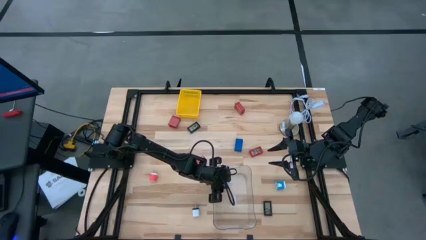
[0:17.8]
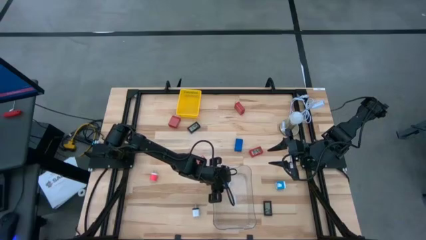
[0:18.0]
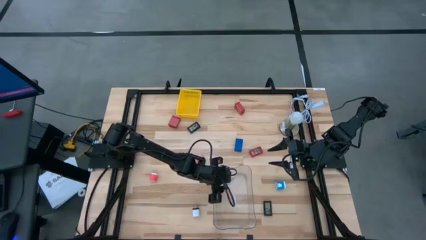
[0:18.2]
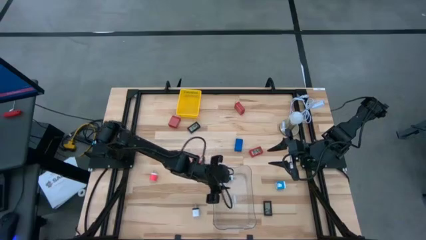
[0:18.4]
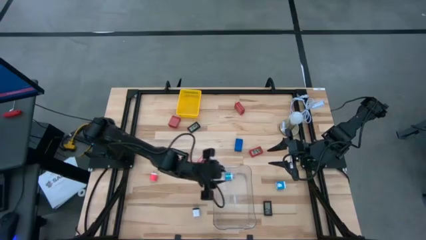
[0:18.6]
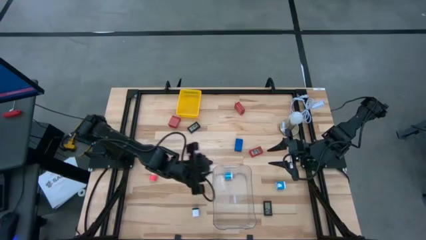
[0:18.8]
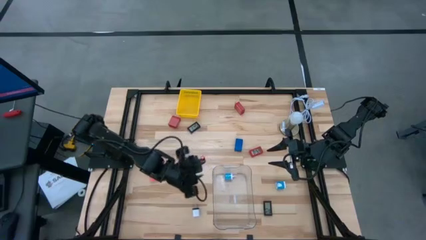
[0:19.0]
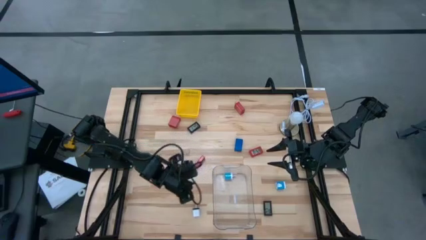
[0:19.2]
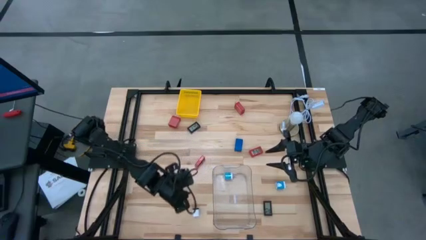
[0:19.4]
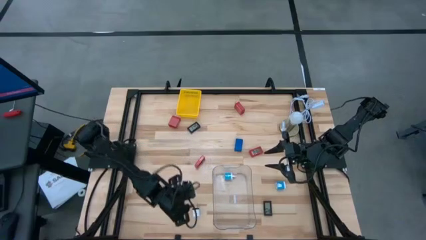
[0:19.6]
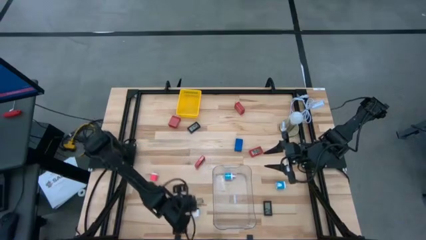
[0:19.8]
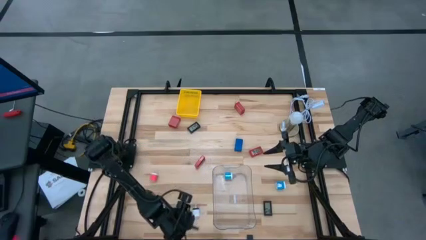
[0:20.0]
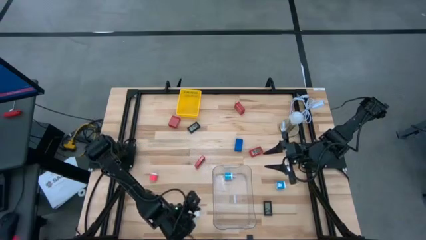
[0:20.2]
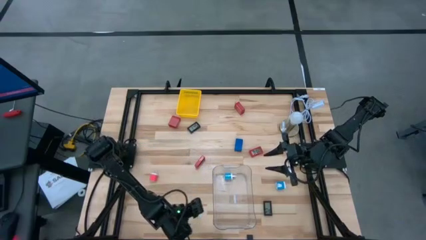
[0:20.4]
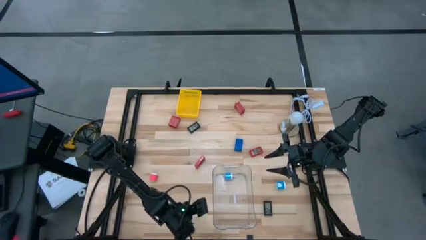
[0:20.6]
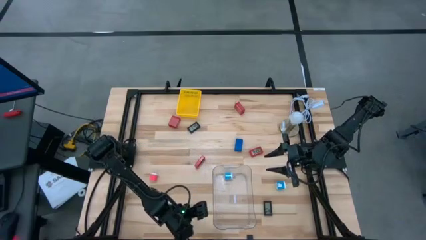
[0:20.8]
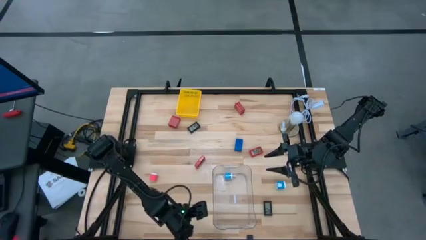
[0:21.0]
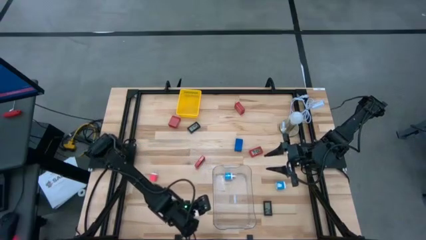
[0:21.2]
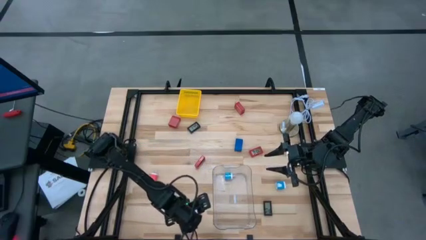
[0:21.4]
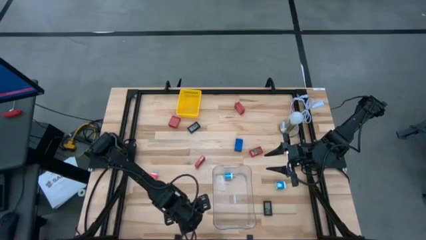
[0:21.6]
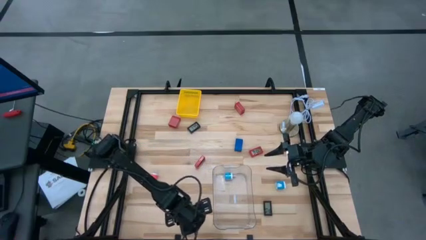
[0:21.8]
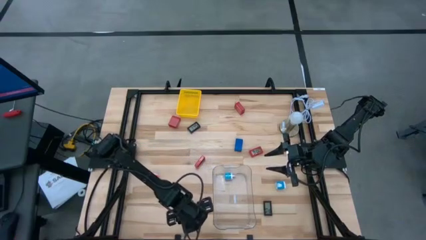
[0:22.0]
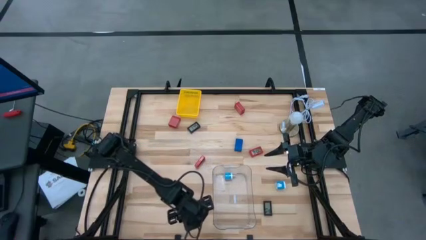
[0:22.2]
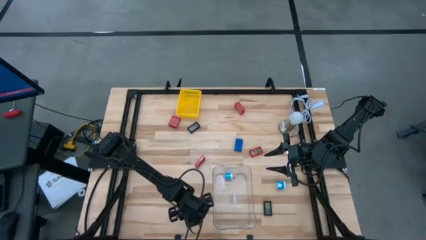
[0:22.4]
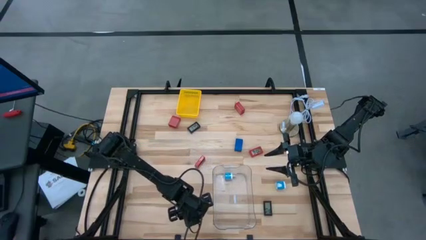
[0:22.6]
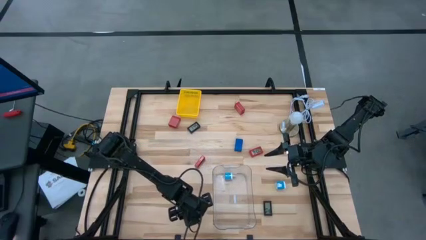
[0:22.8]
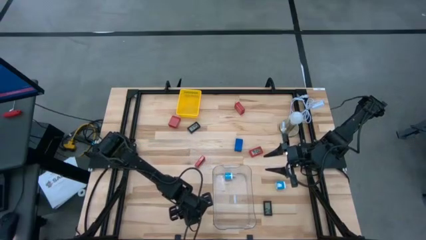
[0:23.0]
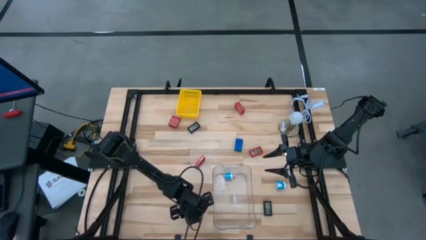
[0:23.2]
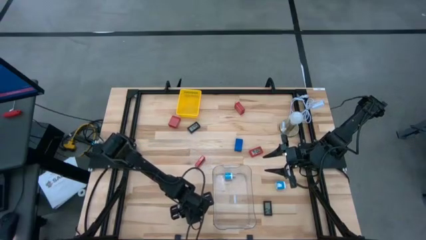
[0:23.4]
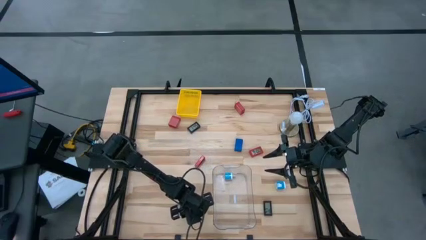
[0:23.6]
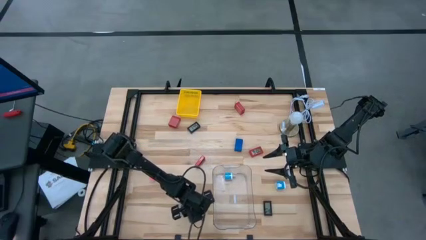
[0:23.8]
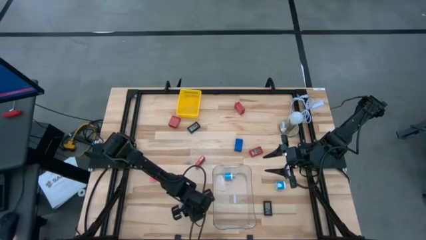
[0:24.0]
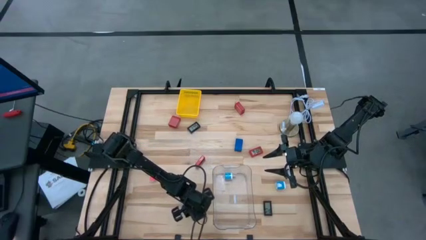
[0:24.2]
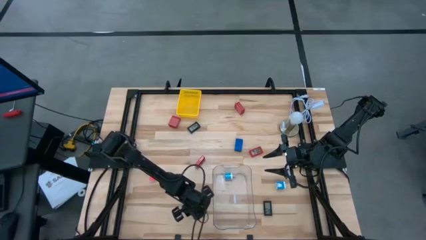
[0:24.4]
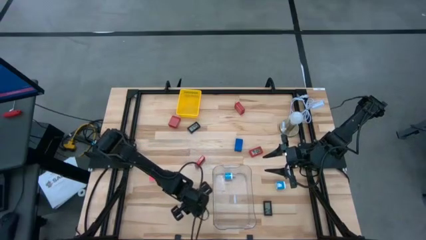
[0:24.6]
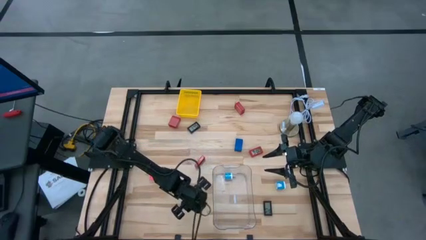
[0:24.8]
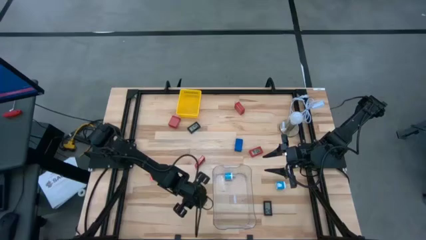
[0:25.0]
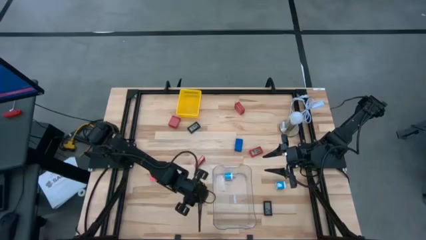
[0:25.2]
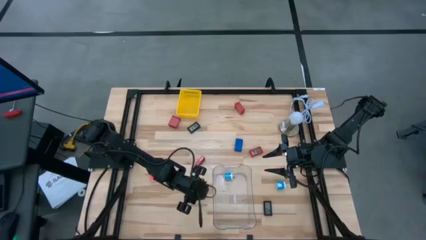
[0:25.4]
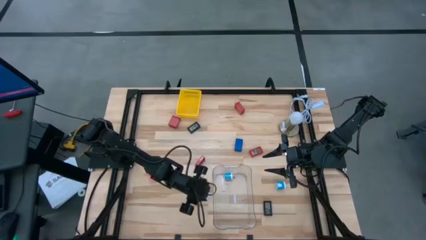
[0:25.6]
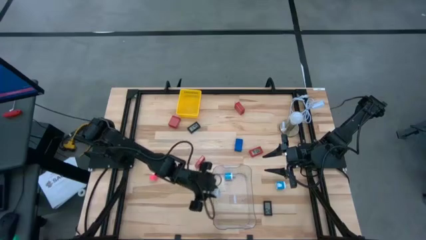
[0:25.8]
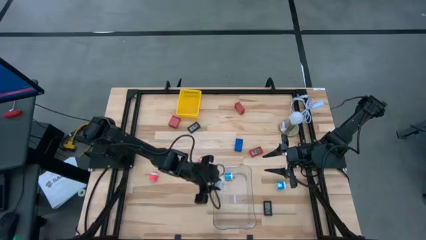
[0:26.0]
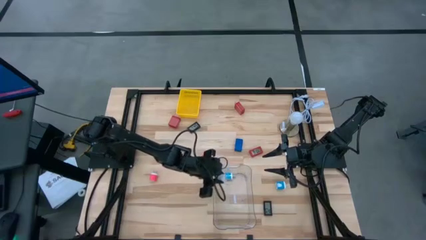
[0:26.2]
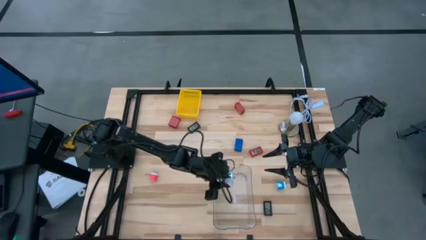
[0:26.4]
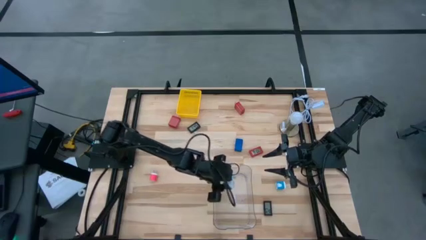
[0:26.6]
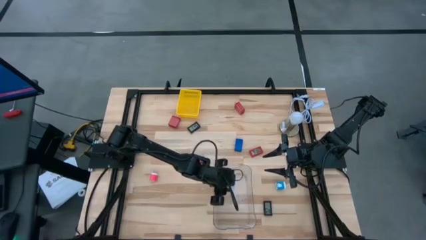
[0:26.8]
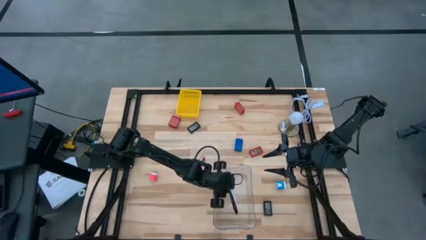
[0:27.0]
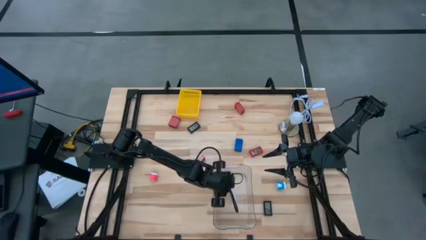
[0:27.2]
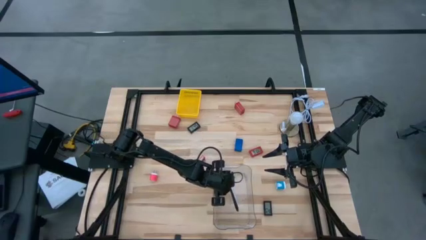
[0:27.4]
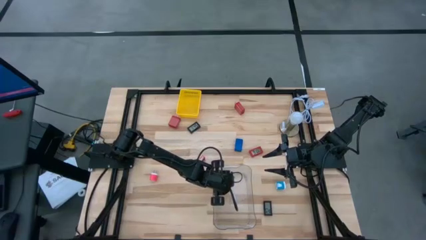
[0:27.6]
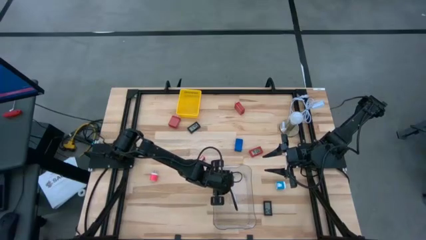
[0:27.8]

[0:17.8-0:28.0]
Task: Pick & Place Office items
Put the white power adapter into the clear bin

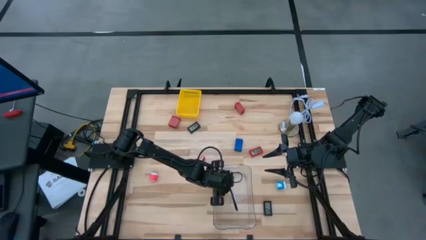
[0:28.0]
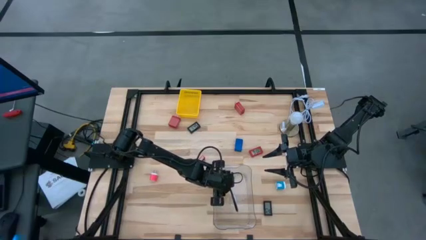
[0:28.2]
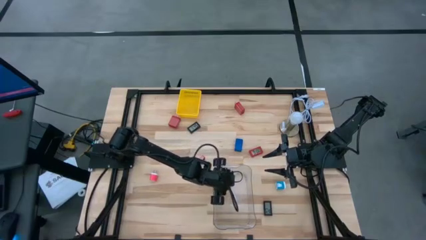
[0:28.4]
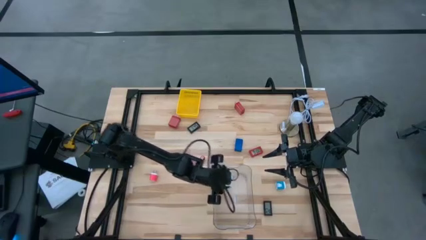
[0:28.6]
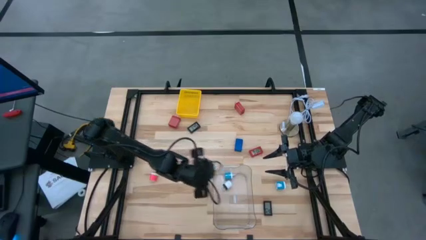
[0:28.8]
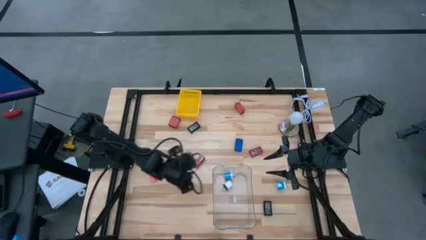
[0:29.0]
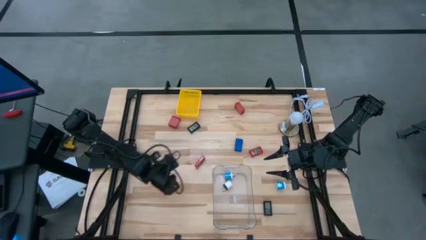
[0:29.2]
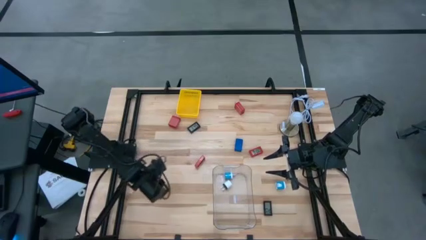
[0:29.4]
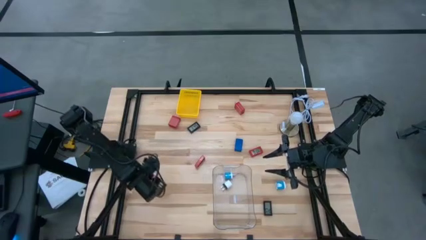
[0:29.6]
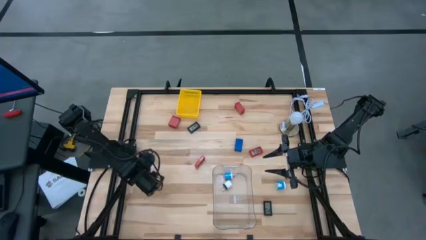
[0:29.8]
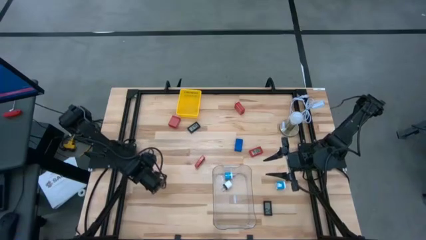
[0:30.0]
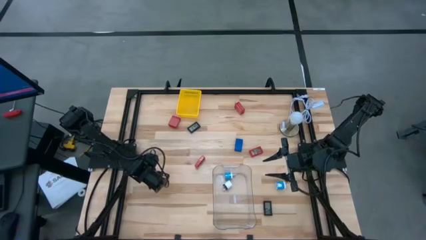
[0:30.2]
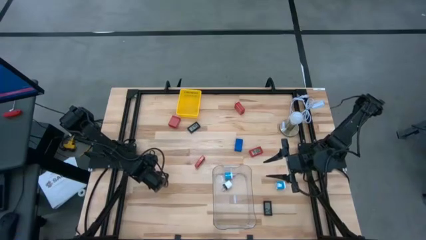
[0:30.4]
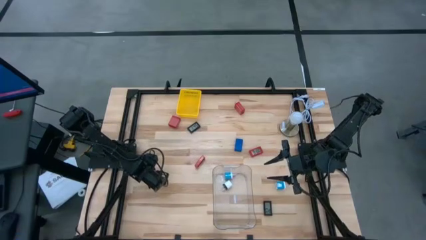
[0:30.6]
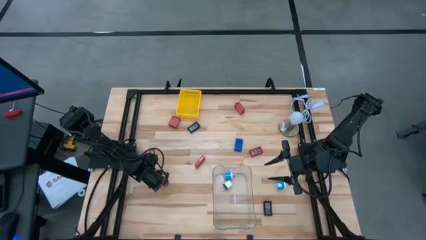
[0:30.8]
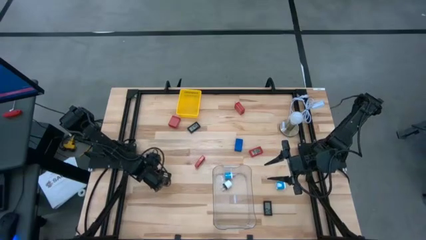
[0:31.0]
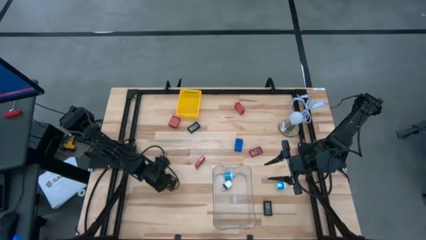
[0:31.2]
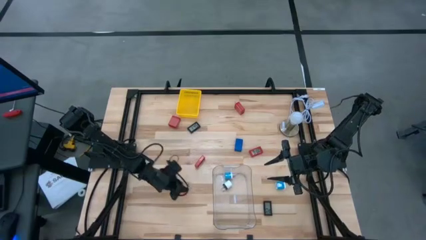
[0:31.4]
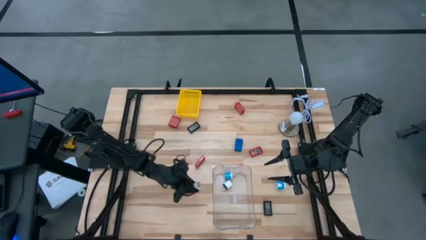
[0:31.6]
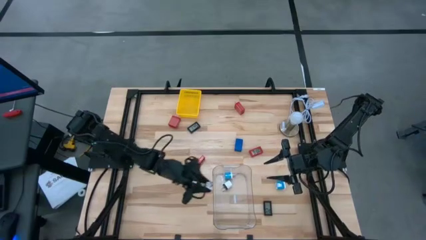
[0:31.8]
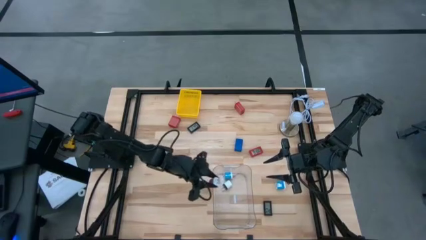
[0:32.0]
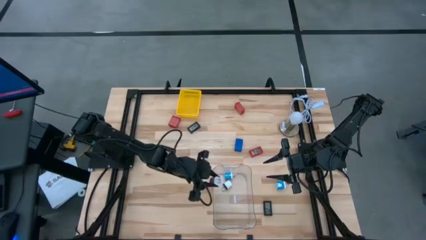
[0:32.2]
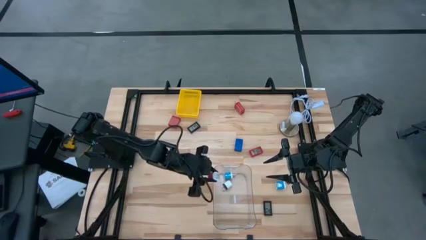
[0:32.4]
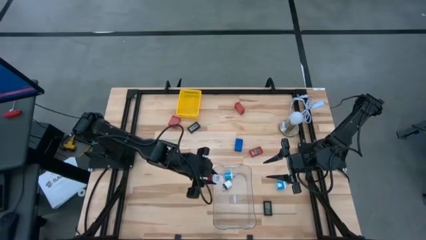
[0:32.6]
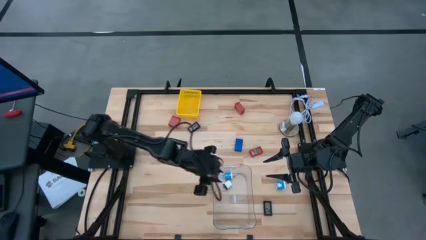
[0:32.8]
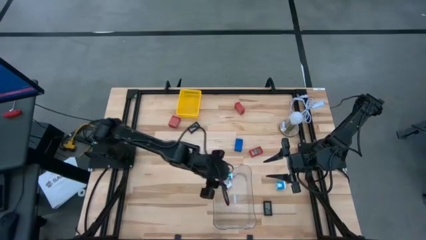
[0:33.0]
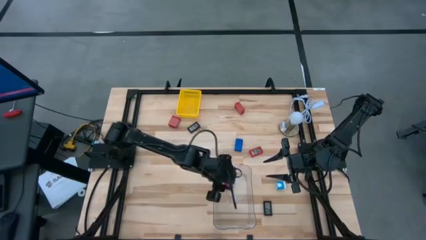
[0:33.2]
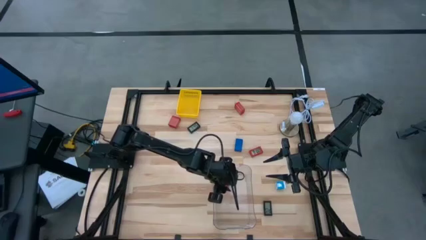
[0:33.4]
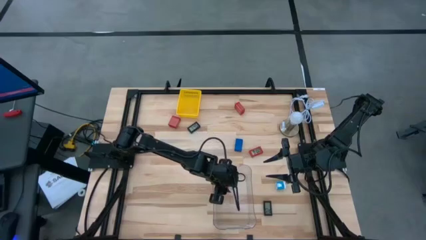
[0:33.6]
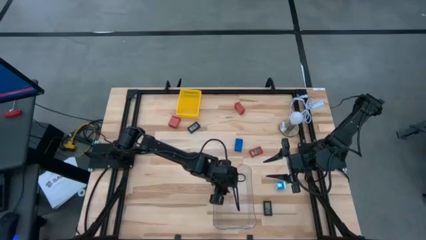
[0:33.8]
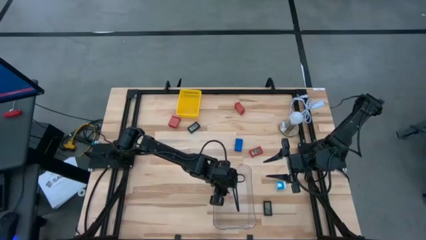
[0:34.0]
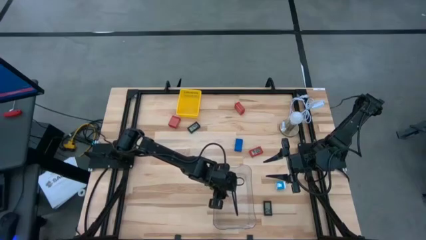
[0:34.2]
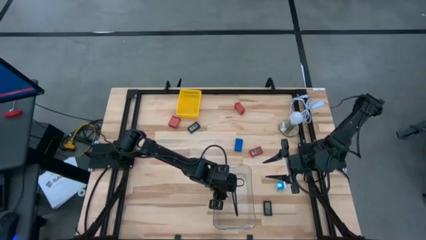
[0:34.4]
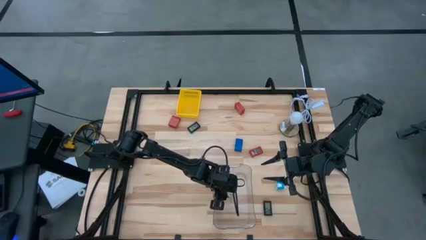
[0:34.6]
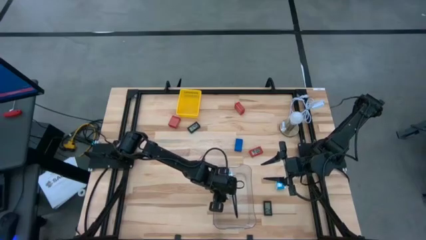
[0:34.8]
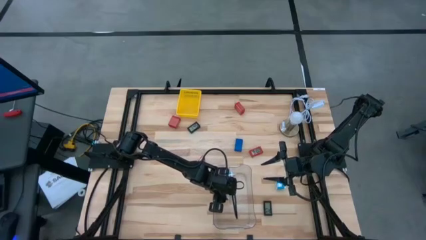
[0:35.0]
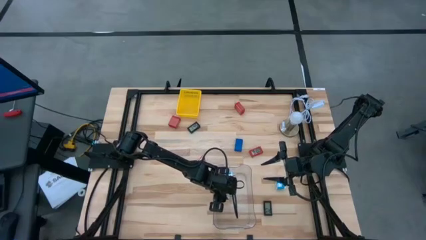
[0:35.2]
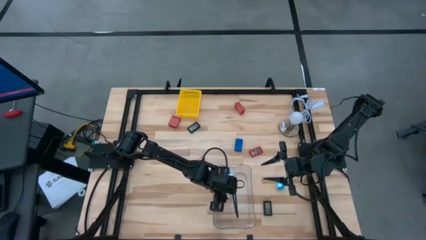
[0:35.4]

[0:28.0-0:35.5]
Put the pink power adapter into the clear bin
